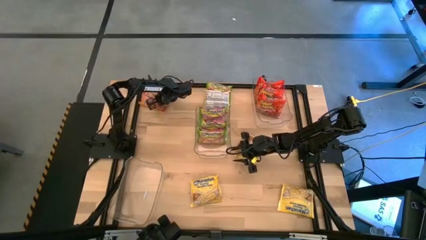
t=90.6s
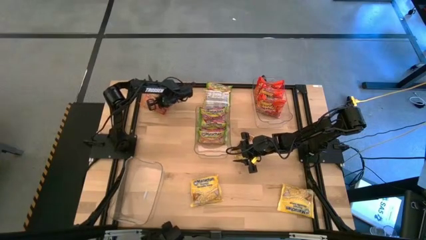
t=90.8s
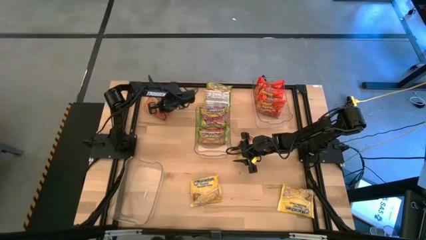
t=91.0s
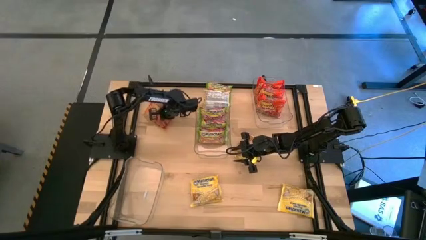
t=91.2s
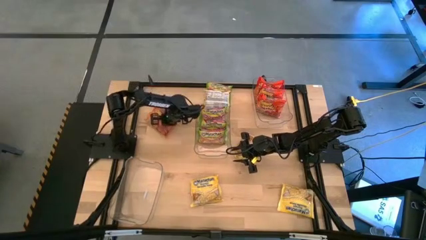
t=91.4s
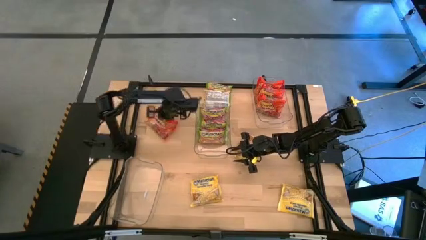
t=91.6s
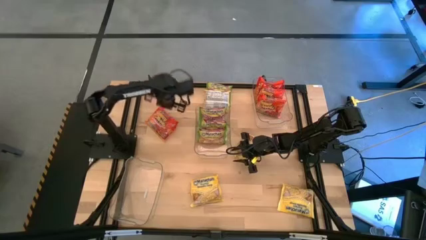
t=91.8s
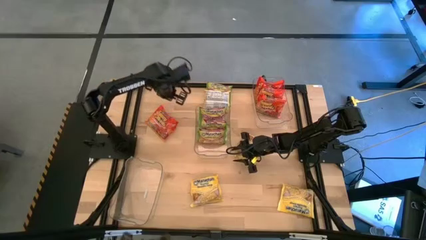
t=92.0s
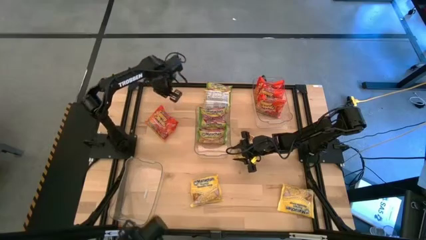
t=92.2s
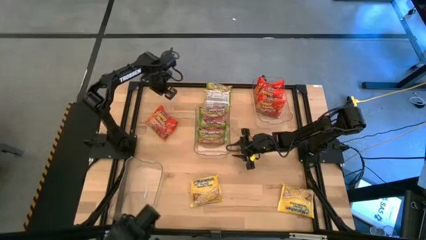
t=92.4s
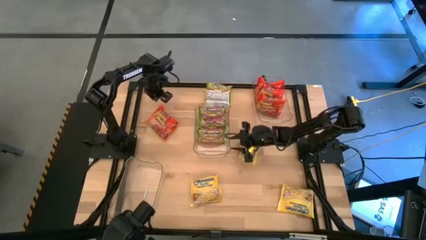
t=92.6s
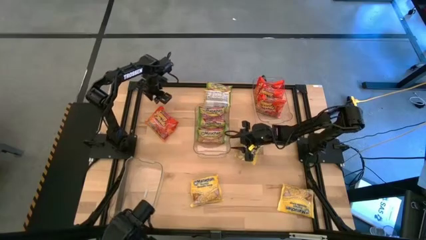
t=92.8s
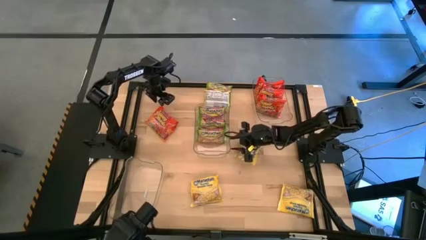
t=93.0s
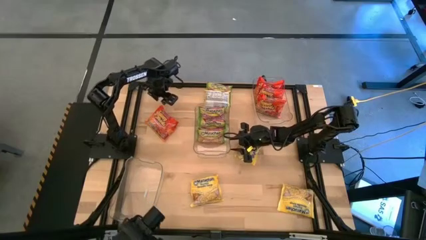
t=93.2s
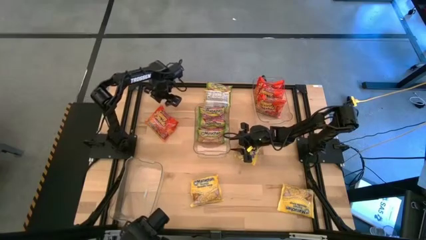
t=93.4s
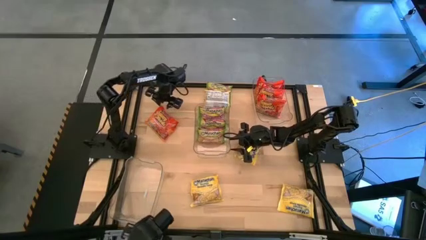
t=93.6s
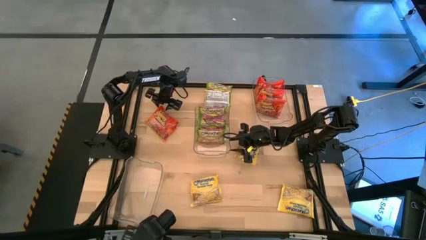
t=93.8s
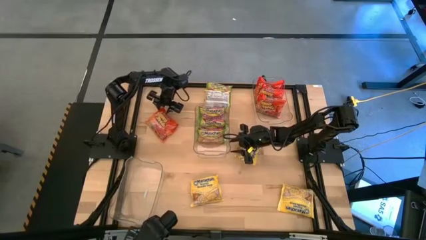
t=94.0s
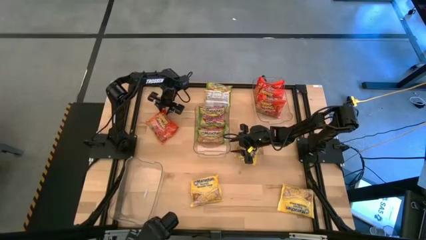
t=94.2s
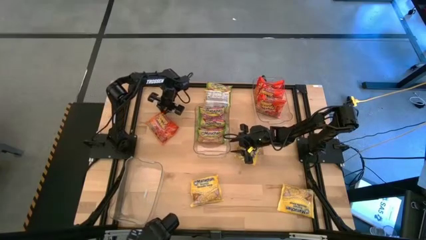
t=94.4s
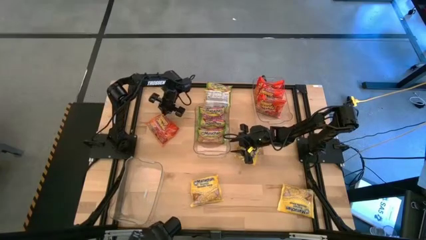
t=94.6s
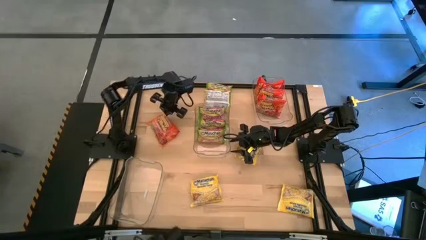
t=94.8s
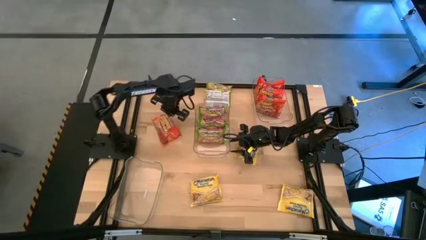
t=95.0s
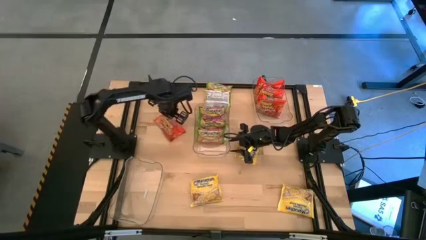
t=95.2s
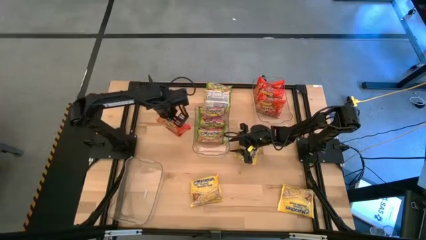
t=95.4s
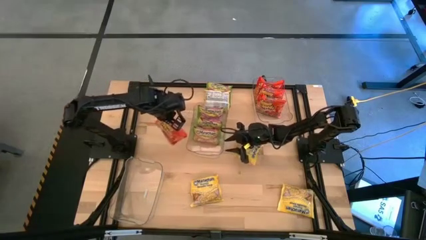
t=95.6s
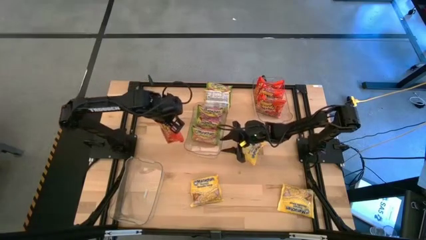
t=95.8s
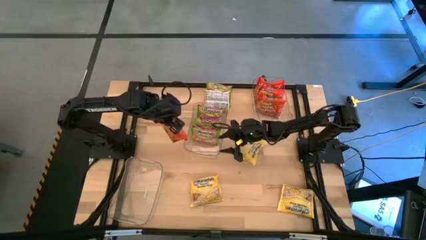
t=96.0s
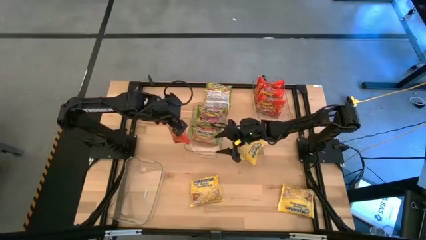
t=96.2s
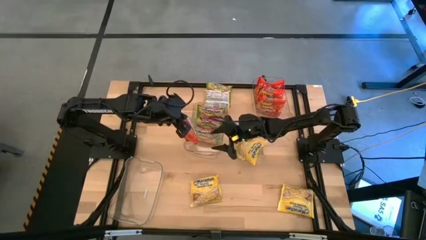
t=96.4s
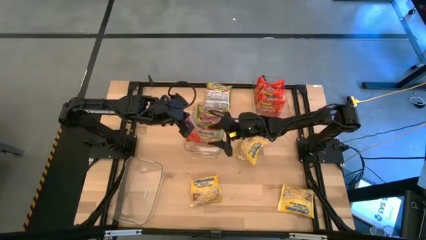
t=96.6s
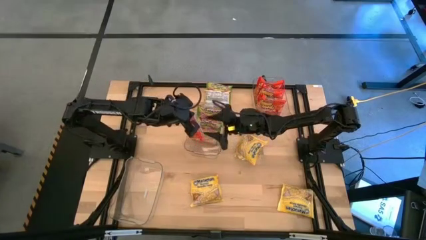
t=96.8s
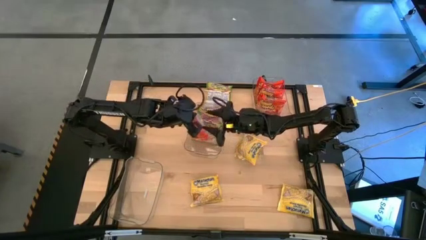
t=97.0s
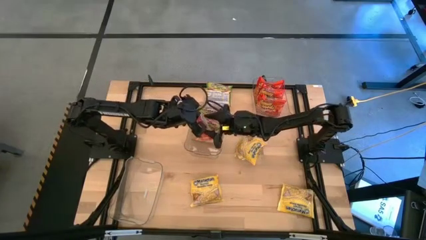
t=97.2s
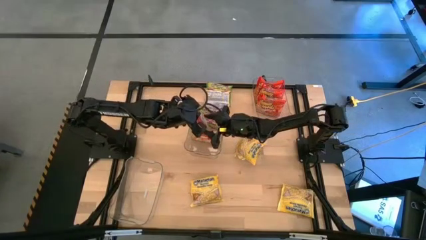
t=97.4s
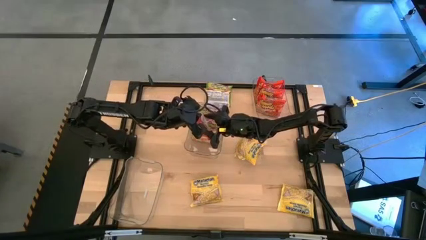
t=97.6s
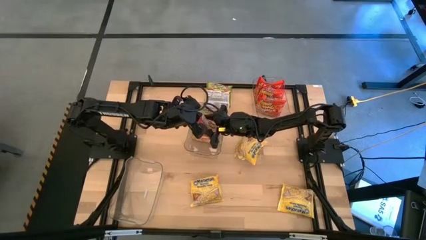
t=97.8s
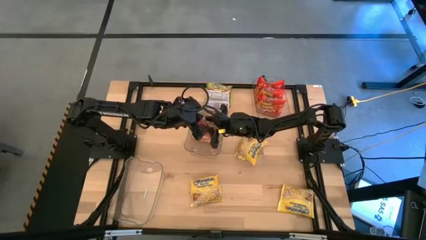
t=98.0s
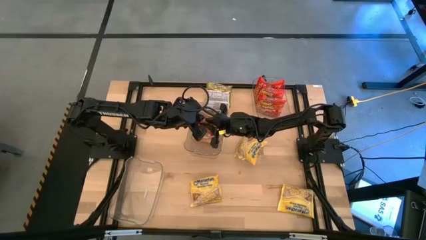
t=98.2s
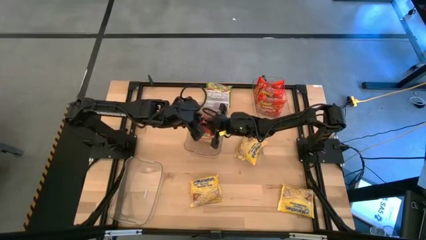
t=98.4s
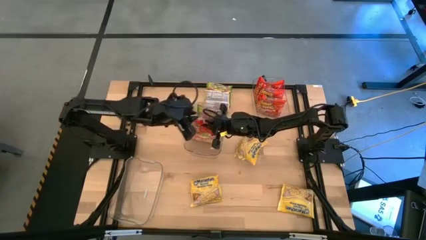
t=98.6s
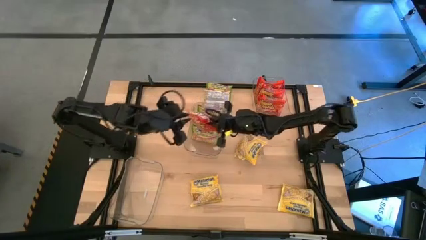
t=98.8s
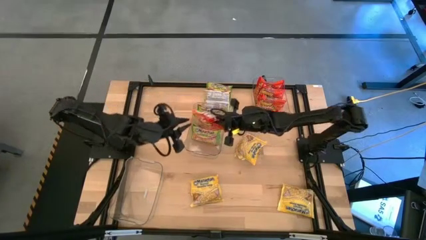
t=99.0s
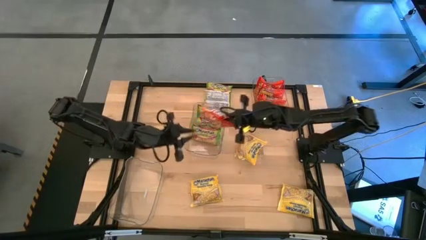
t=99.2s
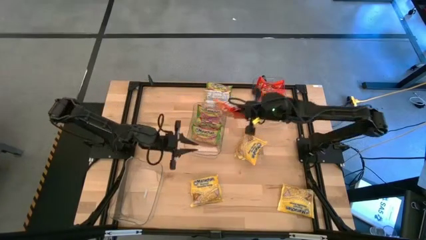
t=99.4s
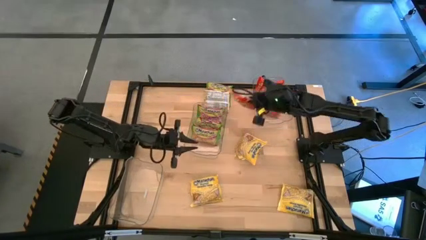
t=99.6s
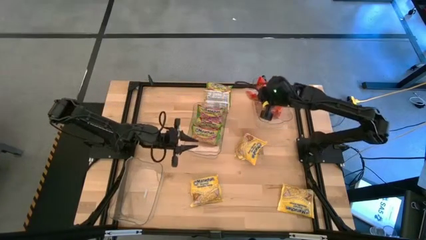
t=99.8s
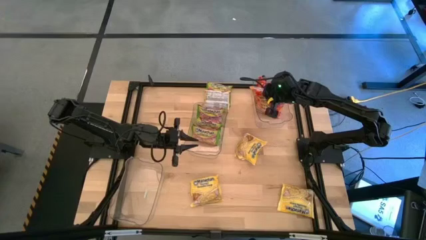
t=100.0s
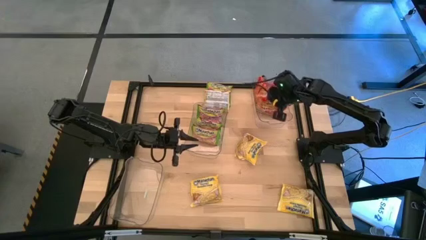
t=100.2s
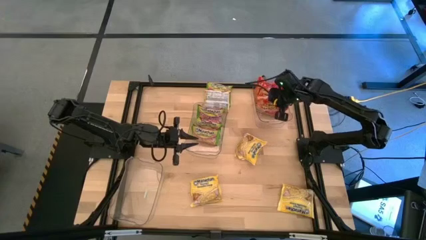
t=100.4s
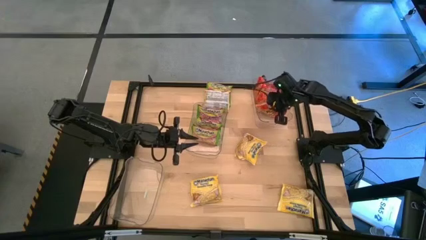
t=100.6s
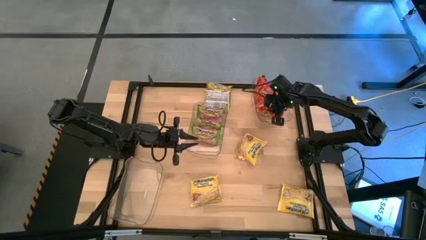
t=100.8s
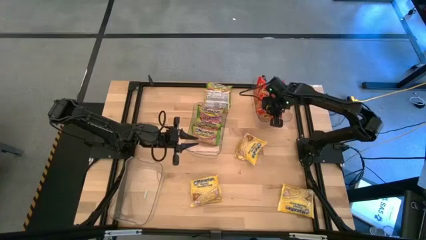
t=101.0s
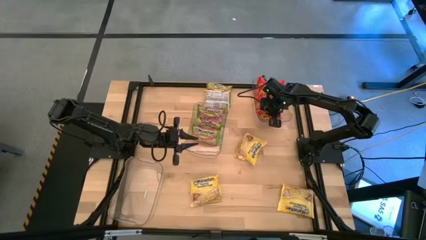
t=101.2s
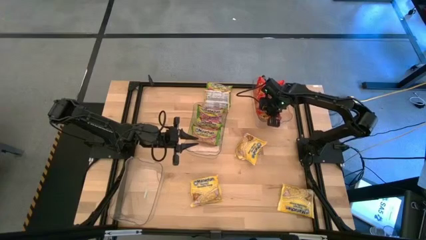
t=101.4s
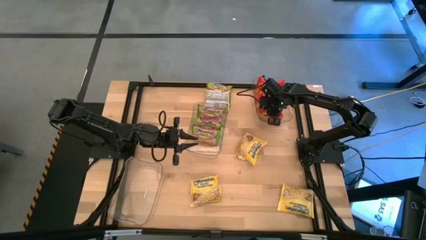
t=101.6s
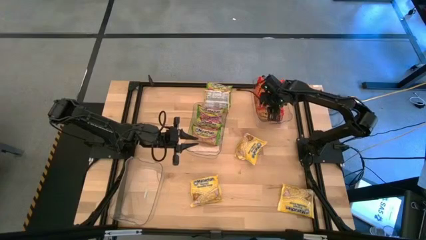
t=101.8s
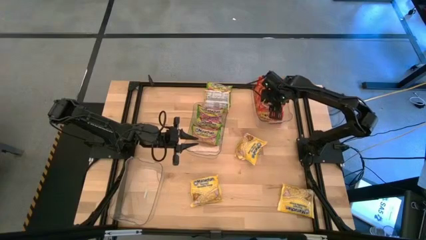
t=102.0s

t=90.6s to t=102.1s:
Task: Sort Maruchan noodles
Put the orange noodle pack into the top right transparent bin

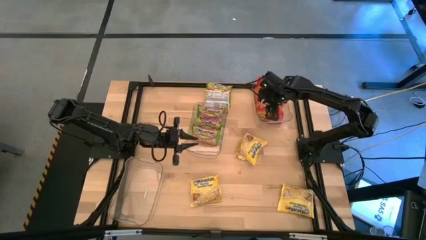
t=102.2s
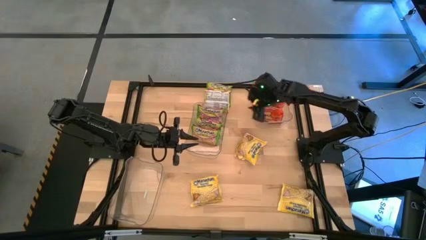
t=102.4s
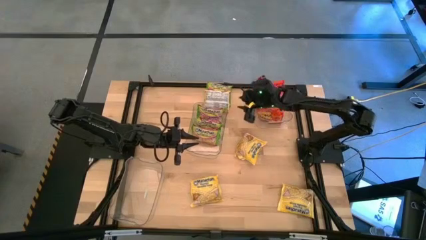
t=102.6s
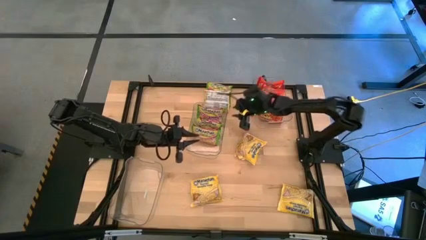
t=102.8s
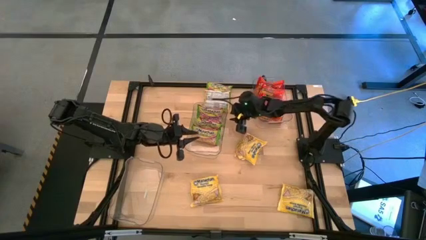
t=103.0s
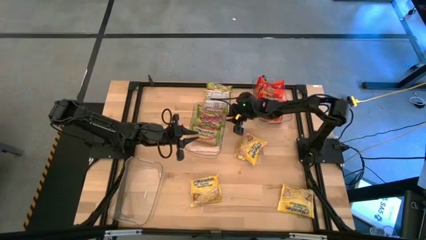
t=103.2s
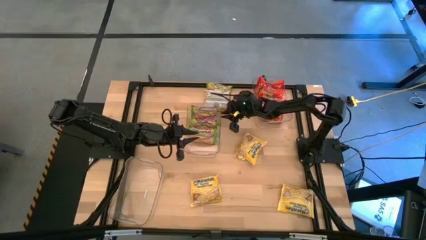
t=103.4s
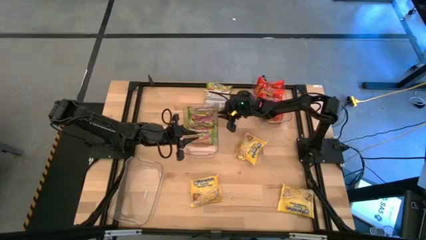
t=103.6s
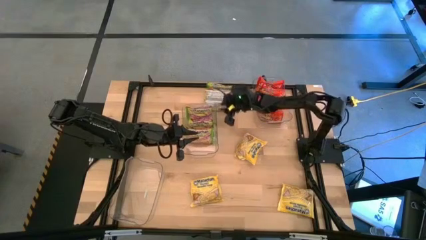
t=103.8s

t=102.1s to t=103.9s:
Adjust the middle transparent bin
